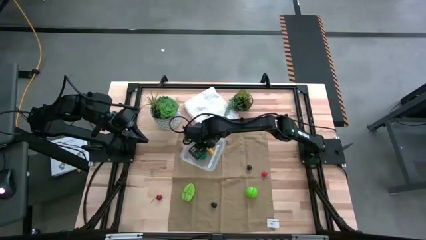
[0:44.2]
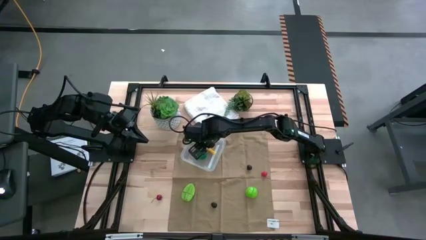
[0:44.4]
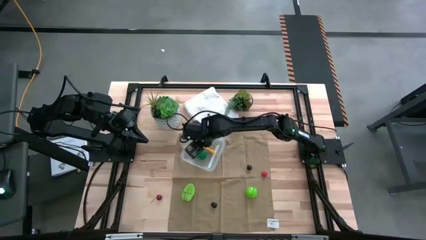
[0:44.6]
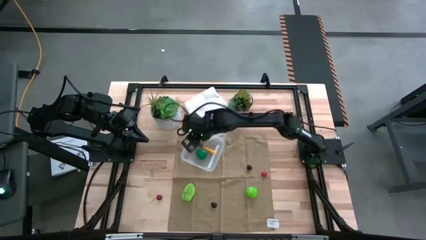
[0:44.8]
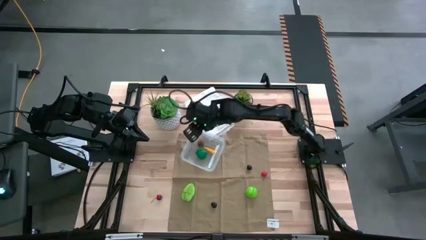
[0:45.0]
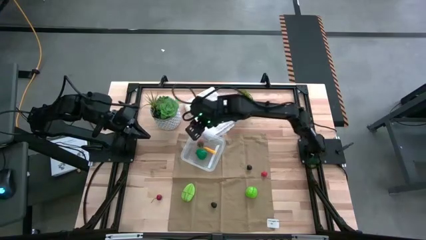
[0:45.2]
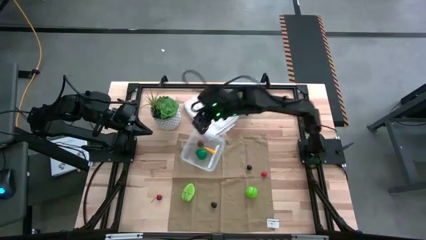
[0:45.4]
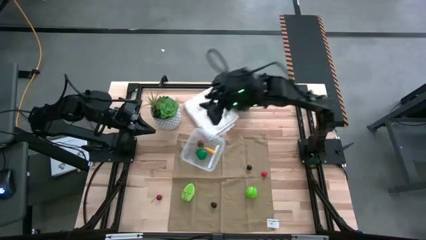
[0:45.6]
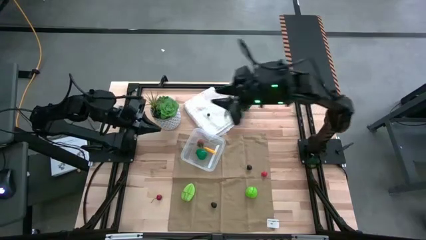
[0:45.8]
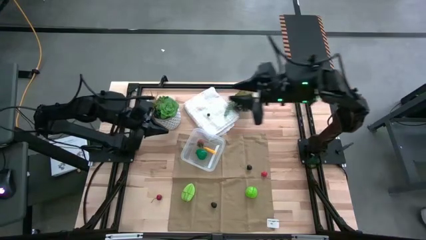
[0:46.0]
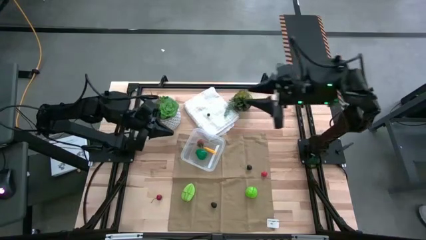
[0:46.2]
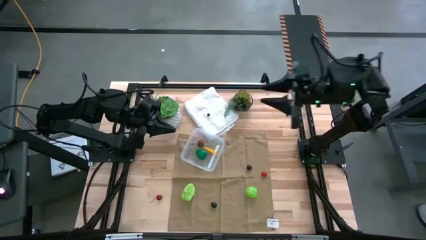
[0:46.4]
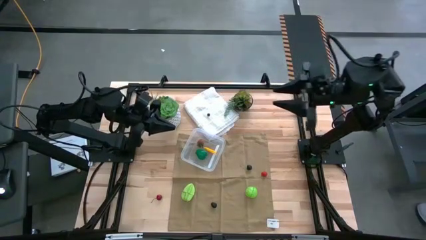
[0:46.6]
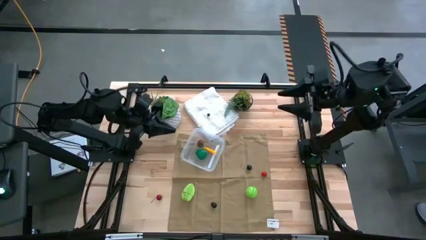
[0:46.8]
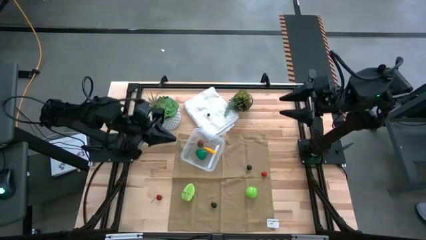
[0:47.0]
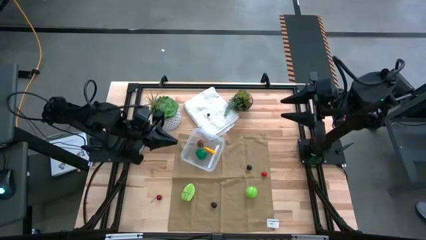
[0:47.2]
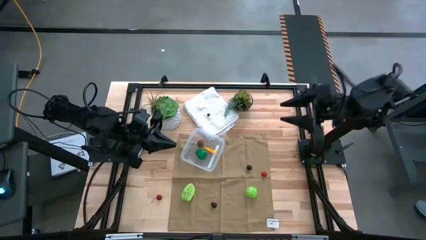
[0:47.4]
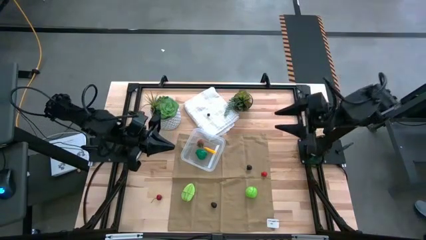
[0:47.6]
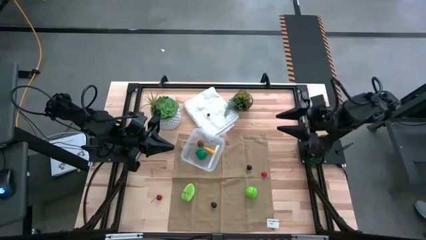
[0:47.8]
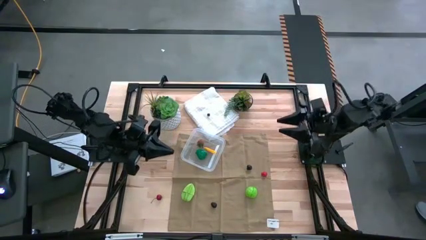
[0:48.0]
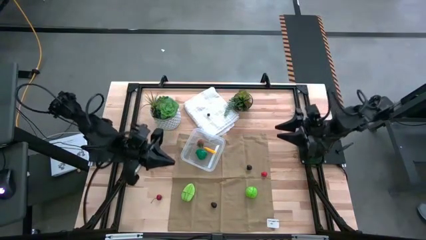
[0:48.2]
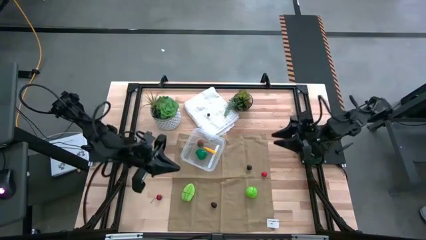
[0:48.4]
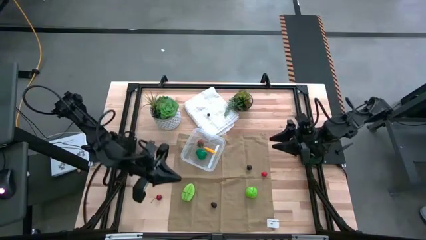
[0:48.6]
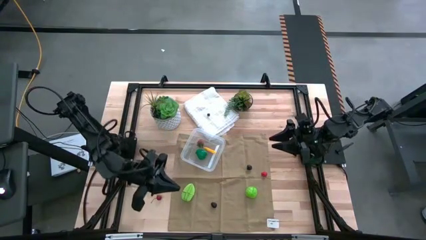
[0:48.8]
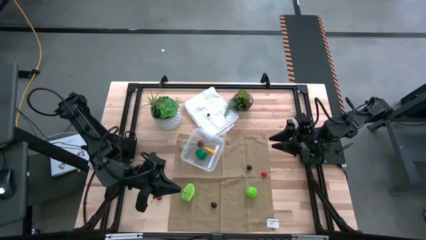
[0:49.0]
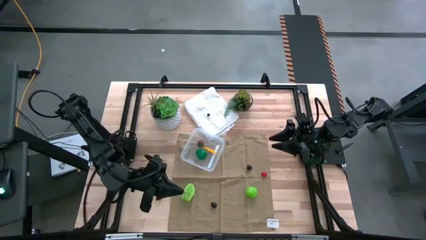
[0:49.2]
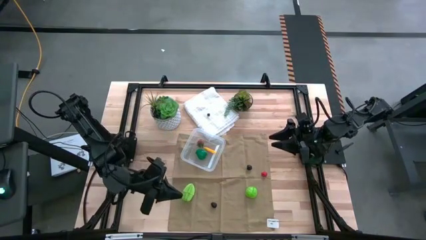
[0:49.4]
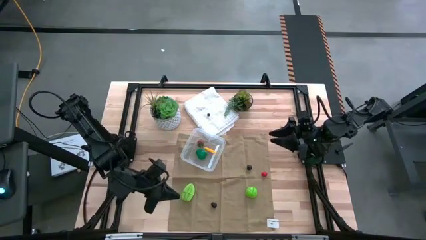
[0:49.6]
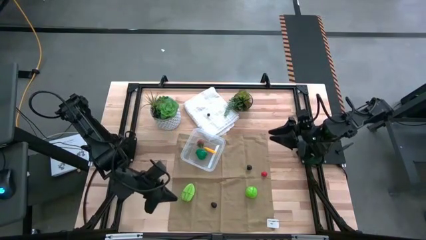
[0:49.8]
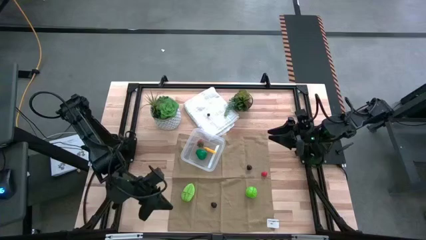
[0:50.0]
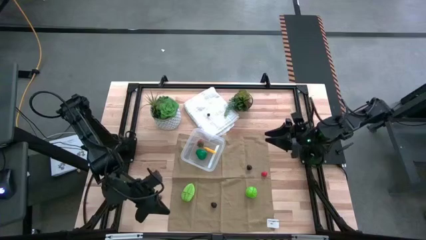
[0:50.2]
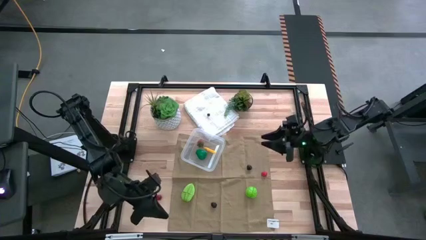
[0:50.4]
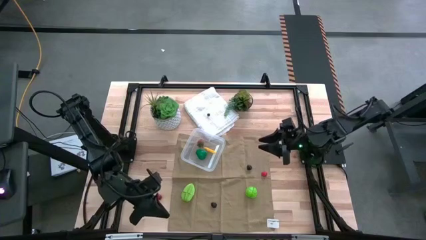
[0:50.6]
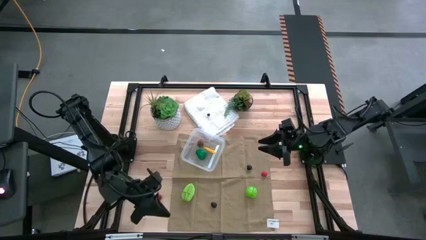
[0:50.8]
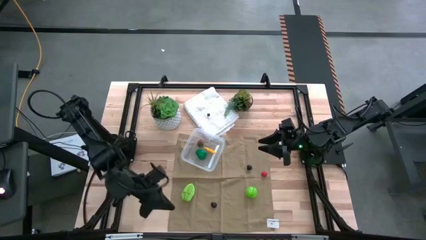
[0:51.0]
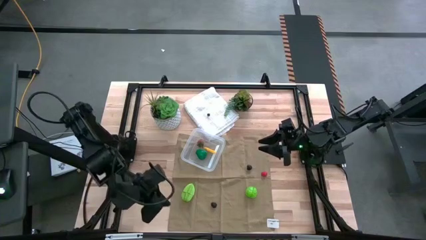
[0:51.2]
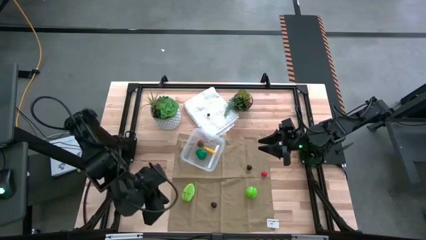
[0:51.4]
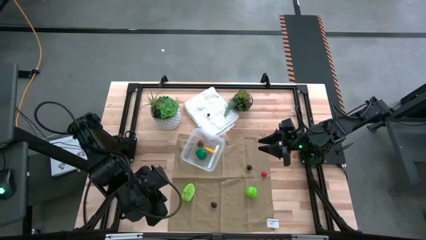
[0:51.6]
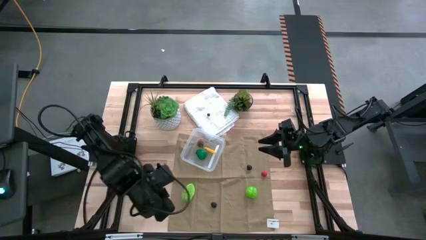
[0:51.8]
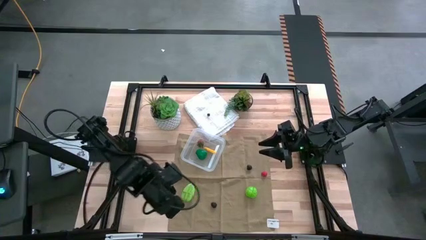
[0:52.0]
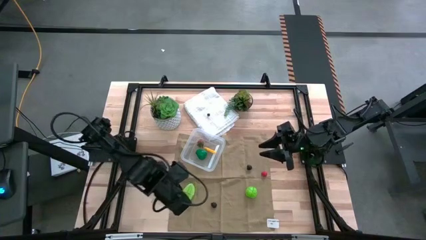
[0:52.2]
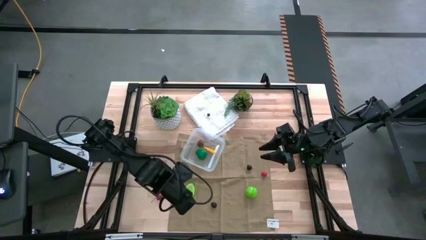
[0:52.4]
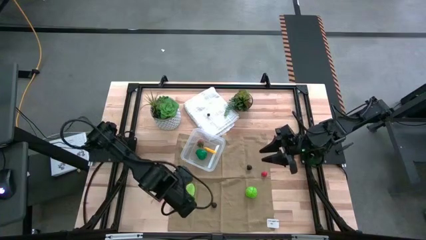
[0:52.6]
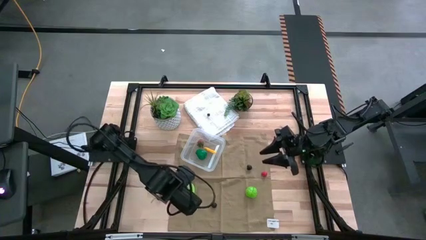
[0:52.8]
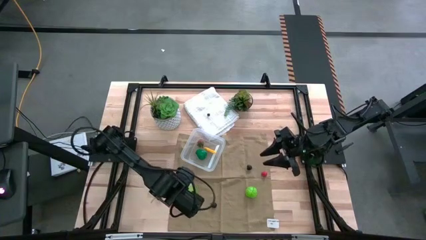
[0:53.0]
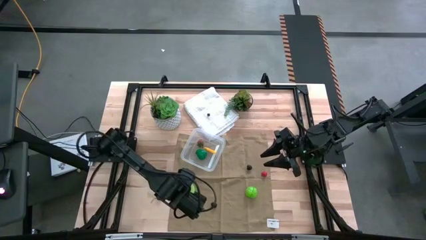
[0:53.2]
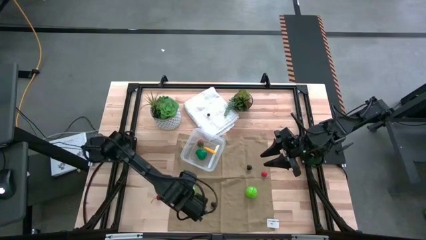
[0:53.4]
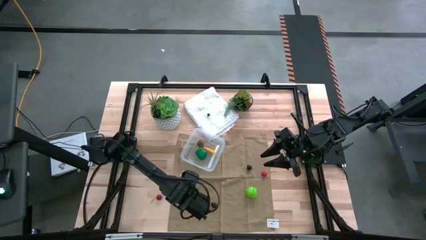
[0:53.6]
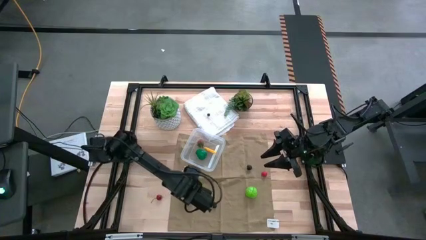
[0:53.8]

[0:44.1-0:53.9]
Task: Pick and placing Produce into tupperware
Put the green starfruit into transparent bin

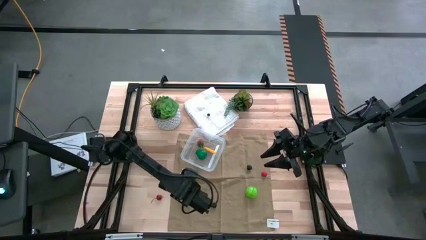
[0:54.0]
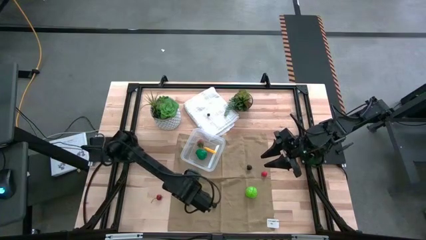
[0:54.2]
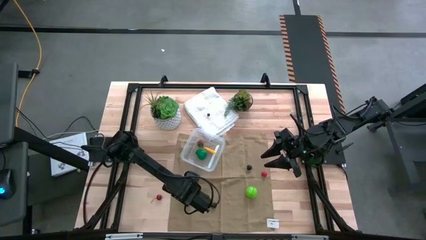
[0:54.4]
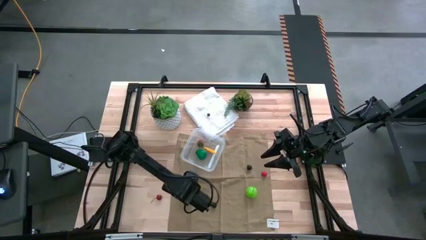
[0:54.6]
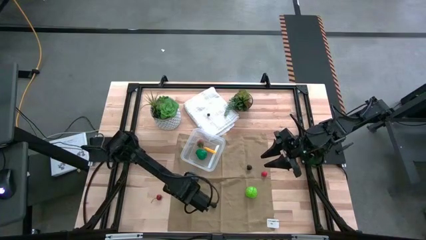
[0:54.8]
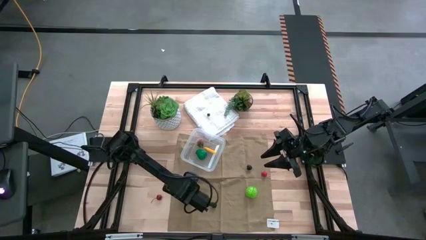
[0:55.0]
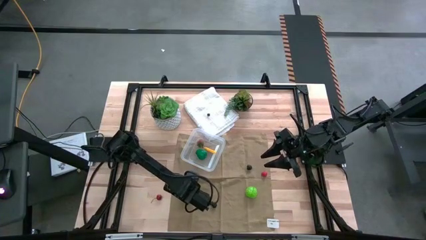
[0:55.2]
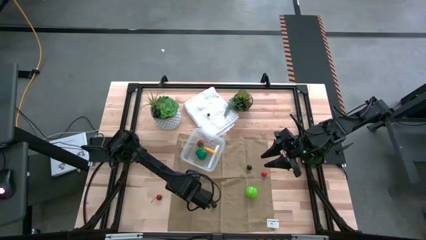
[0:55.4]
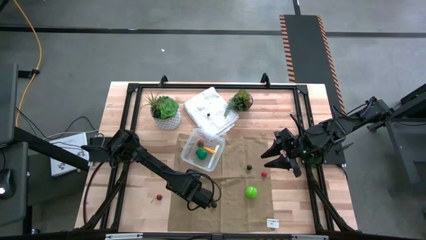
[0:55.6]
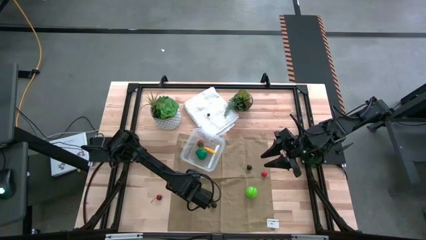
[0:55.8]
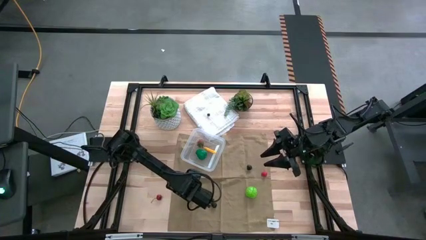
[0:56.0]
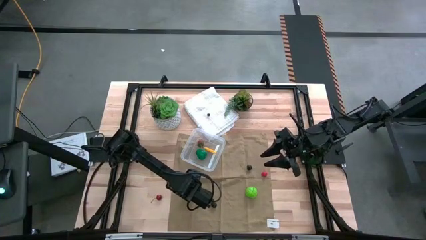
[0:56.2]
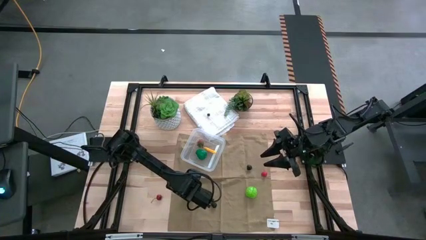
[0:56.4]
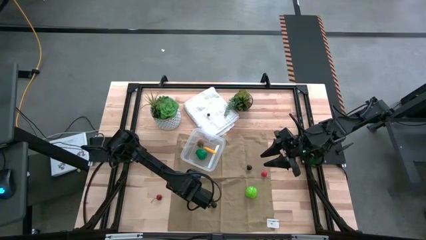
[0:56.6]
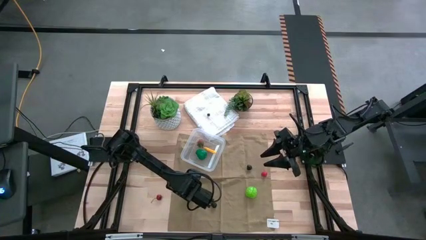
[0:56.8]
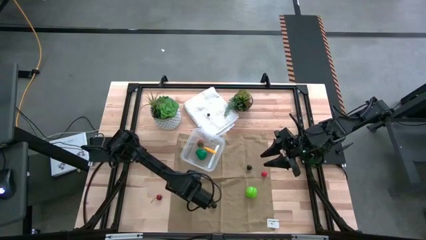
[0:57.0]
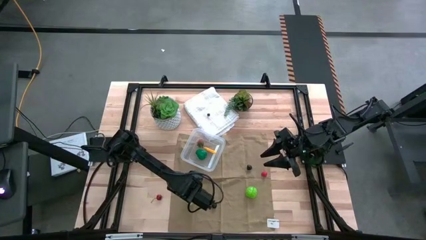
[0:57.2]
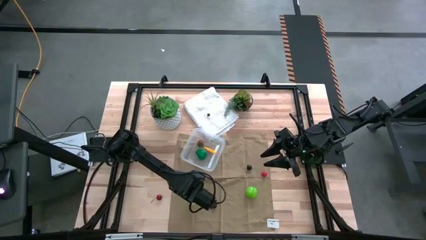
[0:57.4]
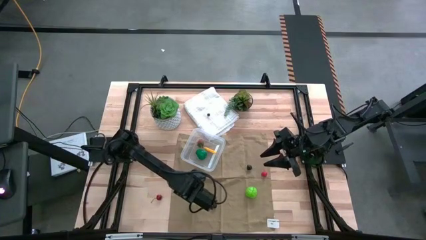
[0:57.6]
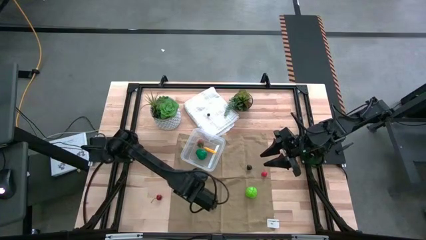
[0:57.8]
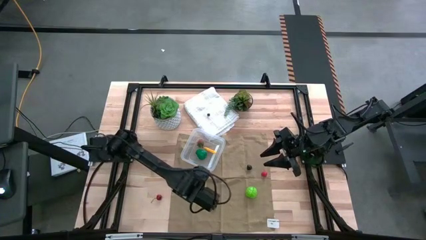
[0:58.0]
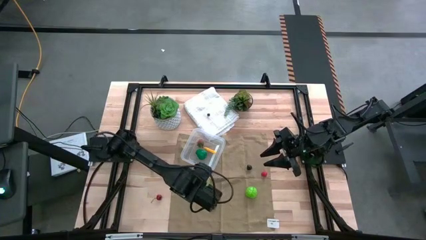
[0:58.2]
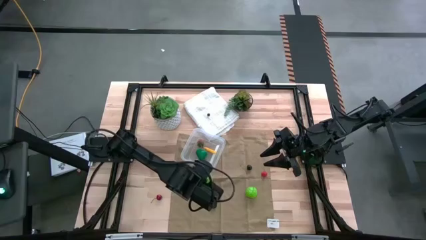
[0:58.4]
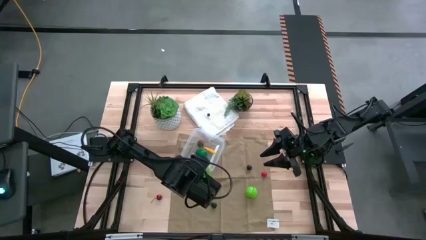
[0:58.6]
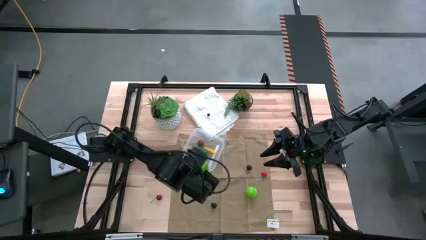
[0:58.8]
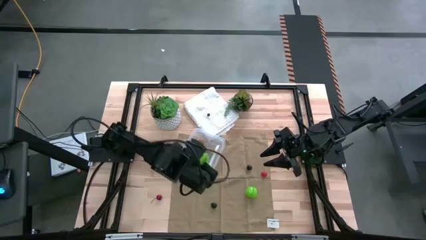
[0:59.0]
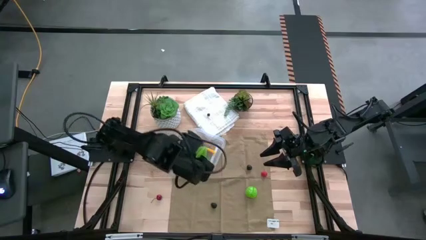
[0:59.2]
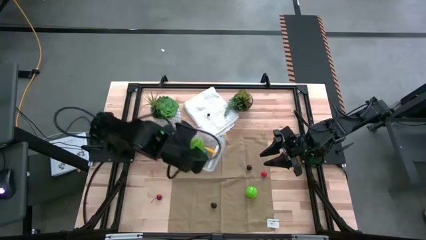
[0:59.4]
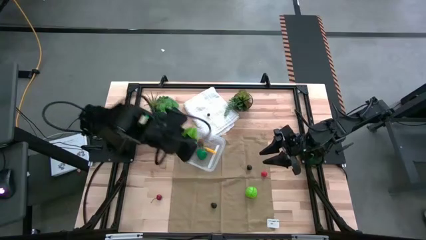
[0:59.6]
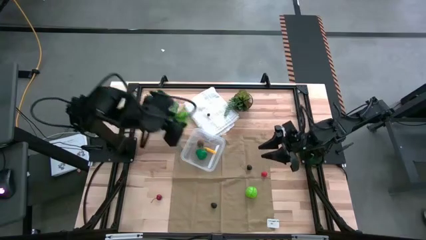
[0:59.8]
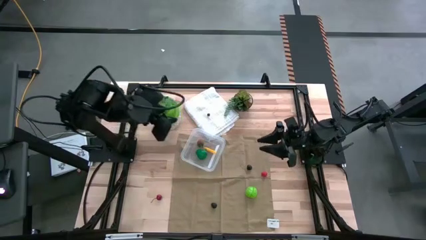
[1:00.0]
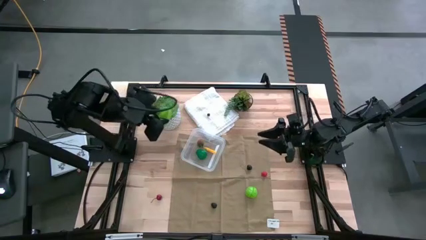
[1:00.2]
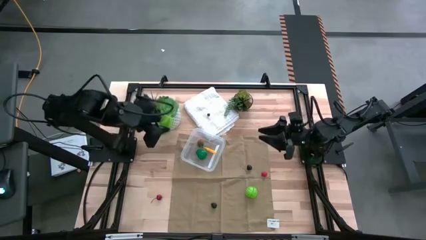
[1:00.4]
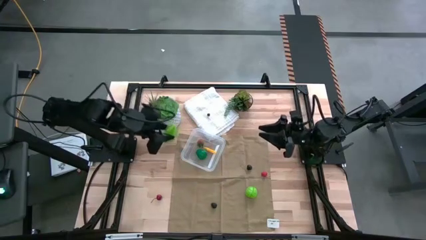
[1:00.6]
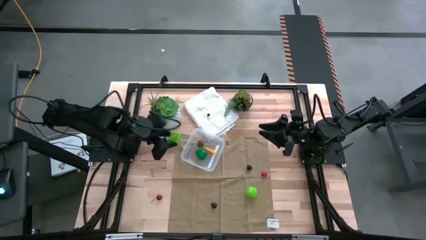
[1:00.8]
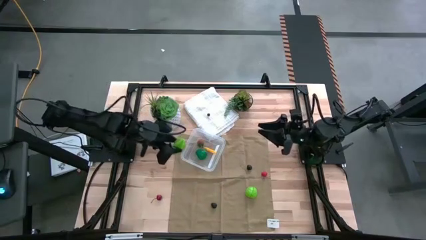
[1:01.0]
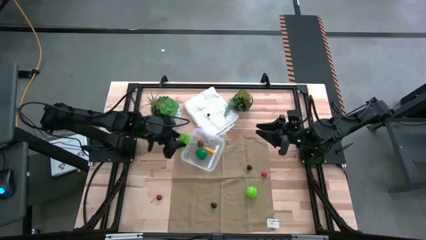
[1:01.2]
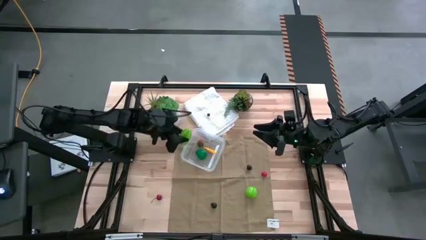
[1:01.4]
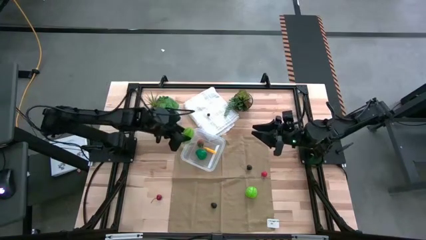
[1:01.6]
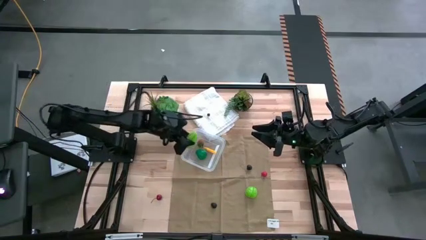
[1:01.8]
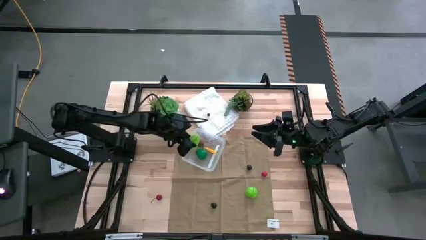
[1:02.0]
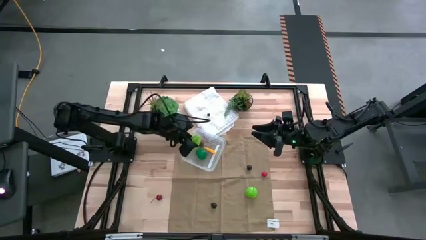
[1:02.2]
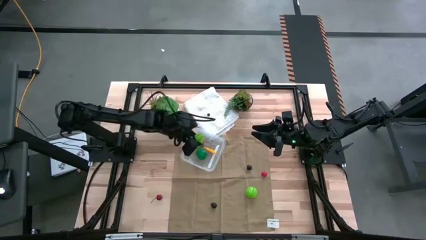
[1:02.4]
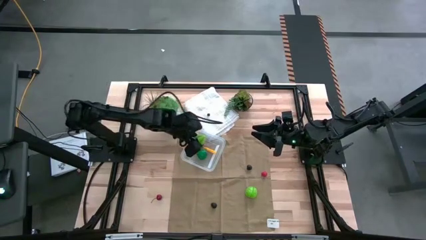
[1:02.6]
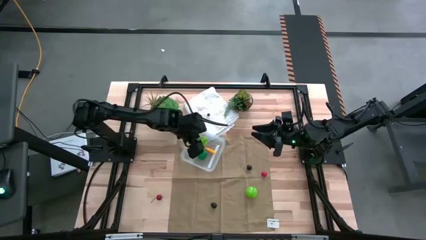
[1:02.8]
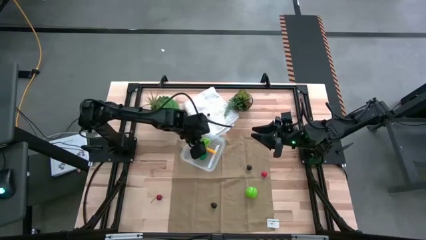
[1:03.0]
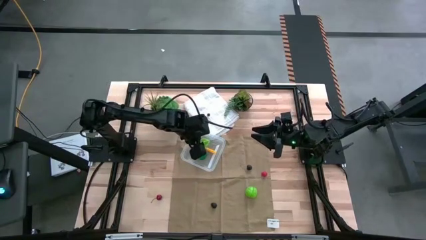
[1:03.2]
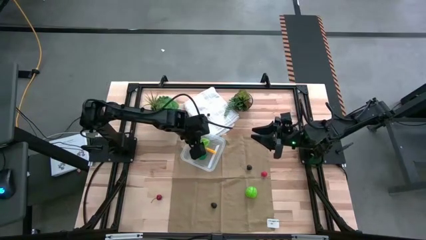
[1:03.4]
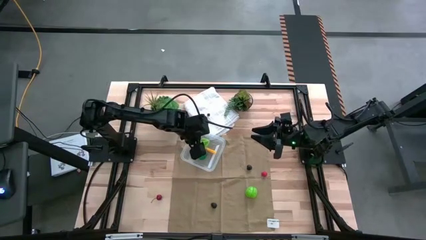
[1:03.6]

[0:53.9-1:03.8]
Put the green starfruit into transparent bin
